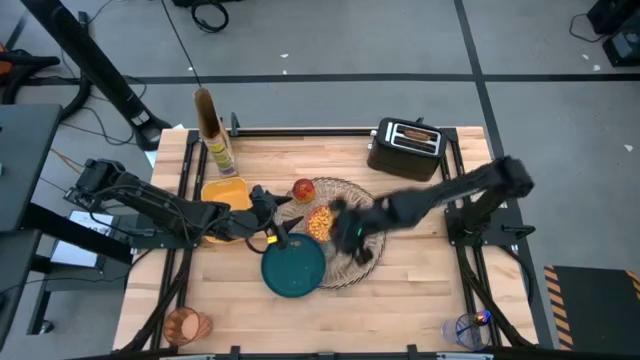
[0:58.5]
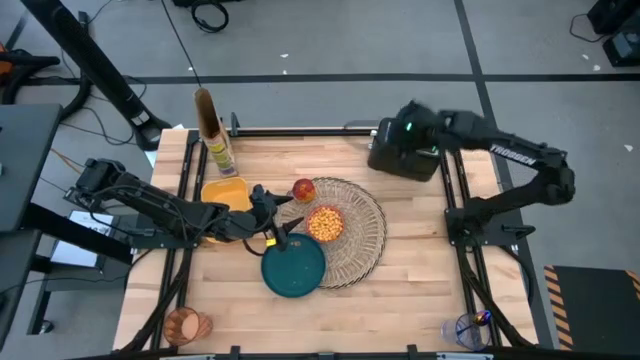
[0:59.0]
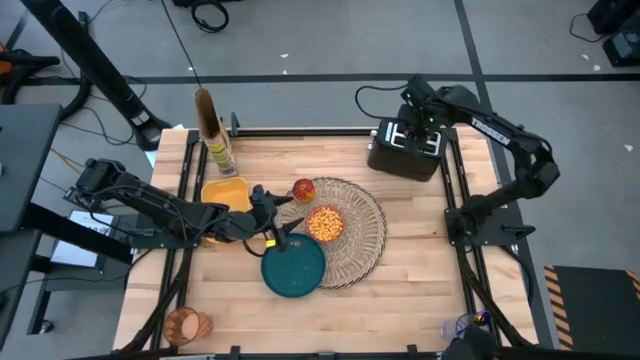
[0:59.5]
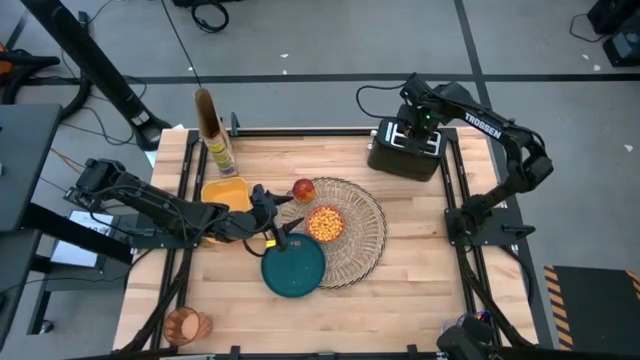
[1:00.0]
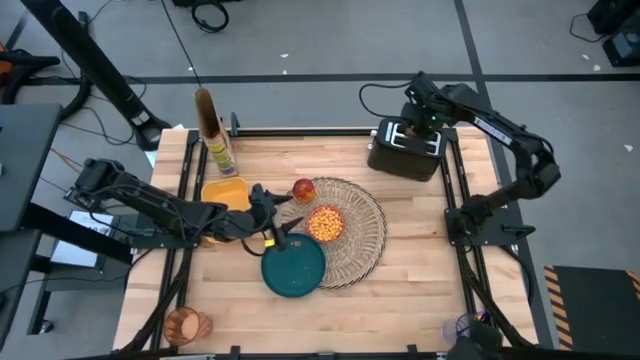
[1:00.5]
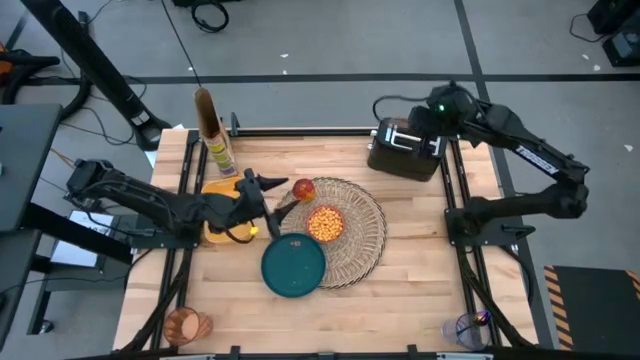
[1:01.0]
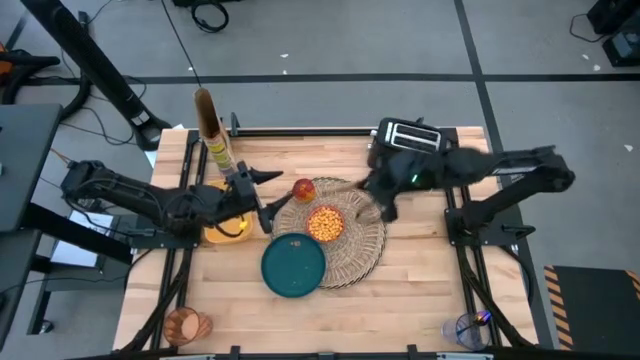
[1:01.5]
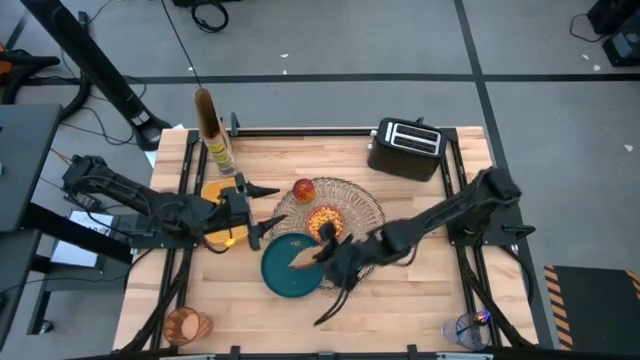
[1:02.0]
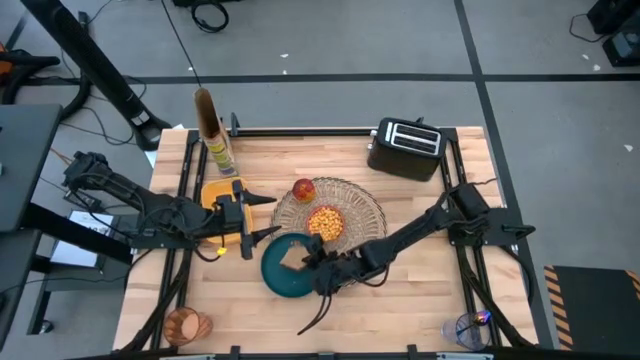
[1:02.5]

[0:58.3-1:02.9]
Task: Arrange a breakfast setting
Put the toast bread on the blue plate from the toaster on the brown table mat

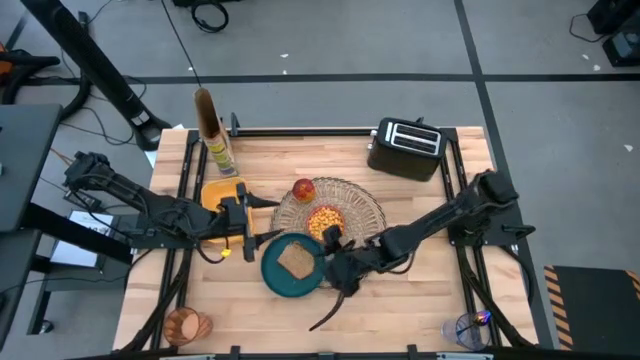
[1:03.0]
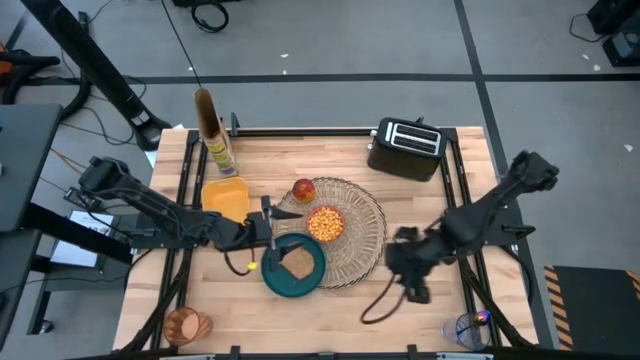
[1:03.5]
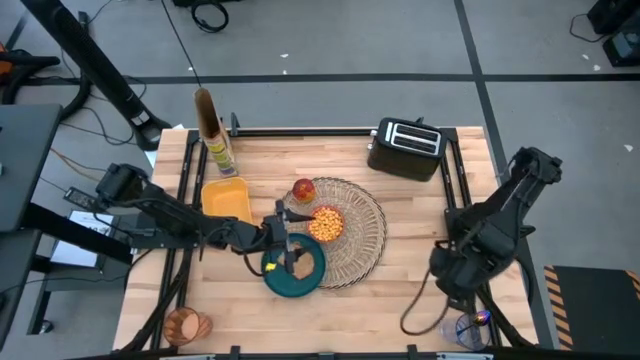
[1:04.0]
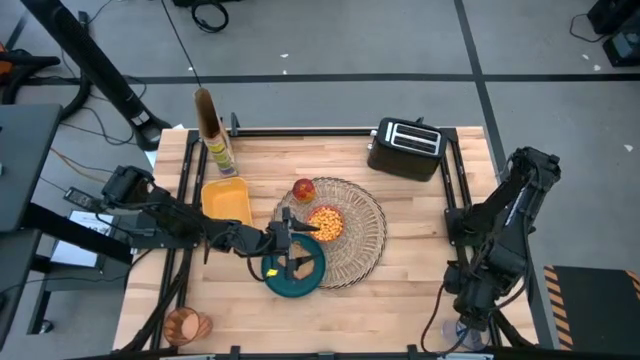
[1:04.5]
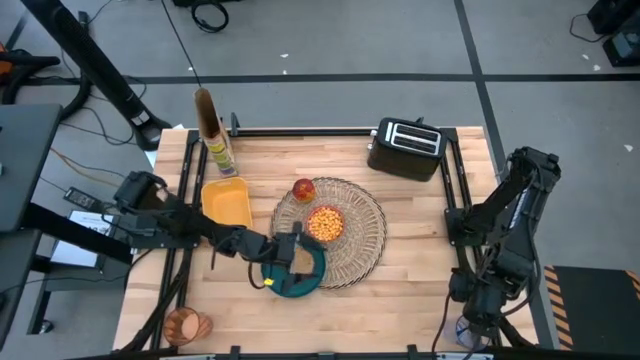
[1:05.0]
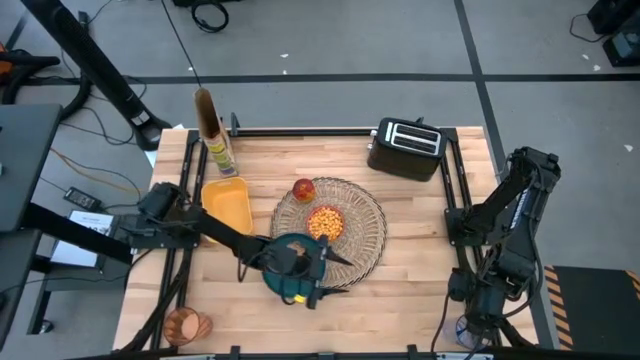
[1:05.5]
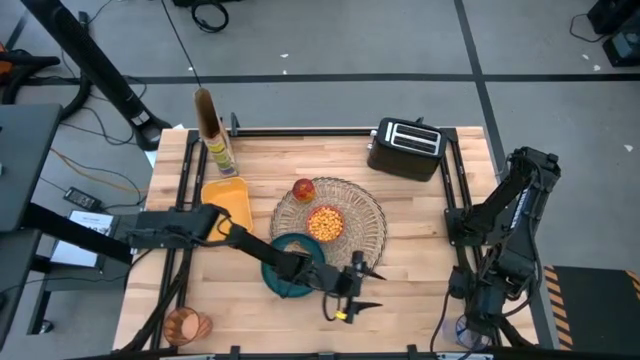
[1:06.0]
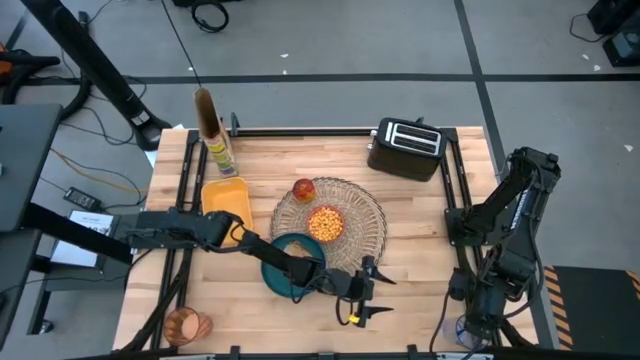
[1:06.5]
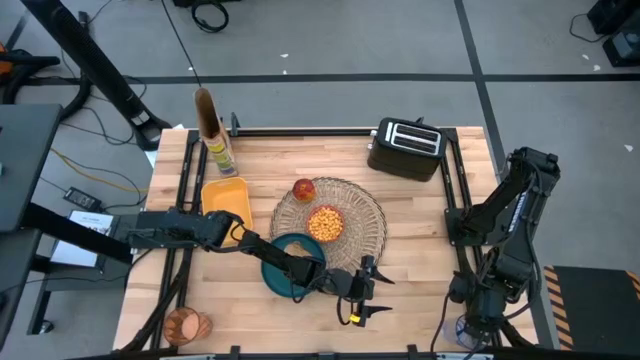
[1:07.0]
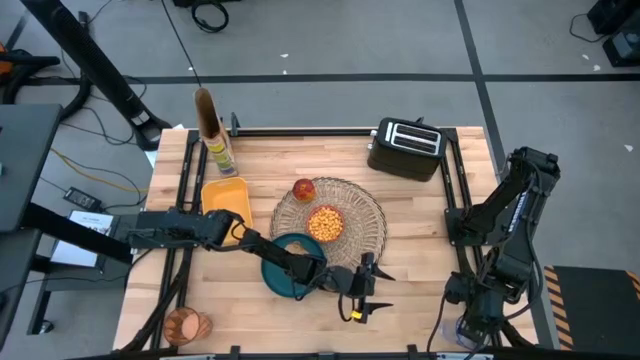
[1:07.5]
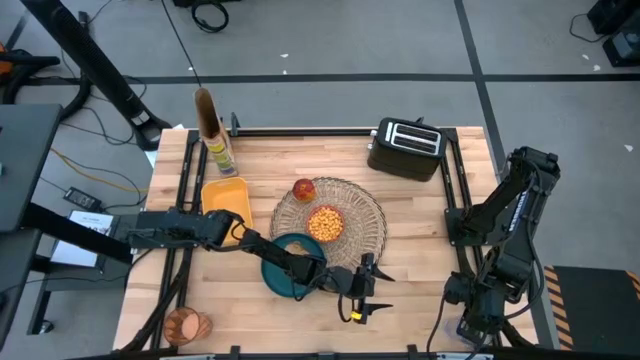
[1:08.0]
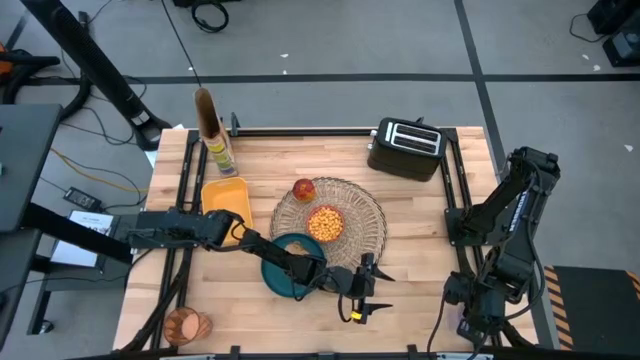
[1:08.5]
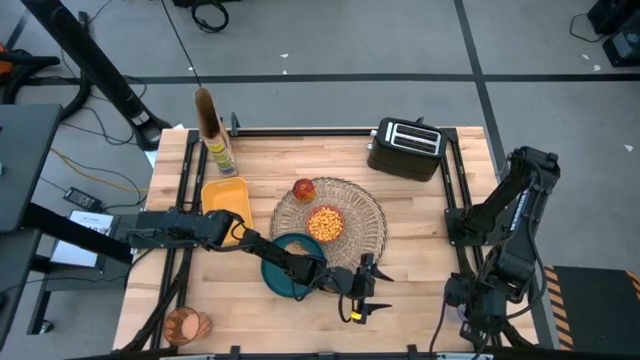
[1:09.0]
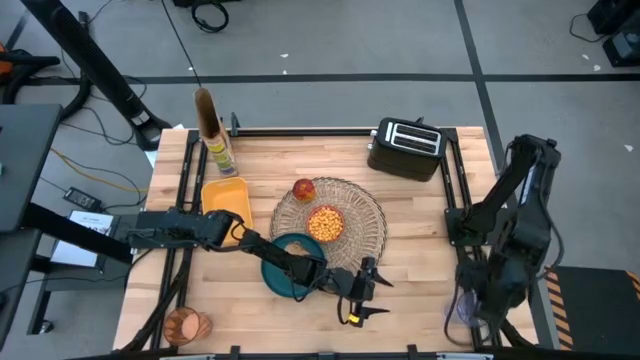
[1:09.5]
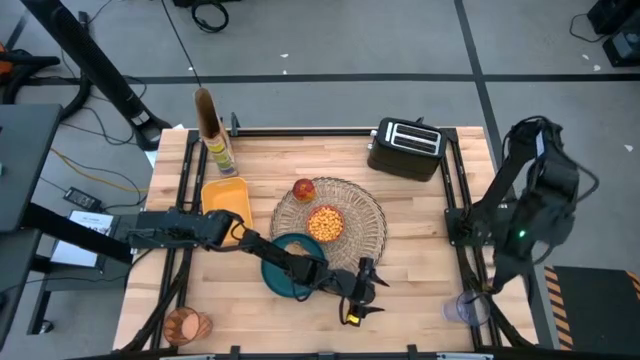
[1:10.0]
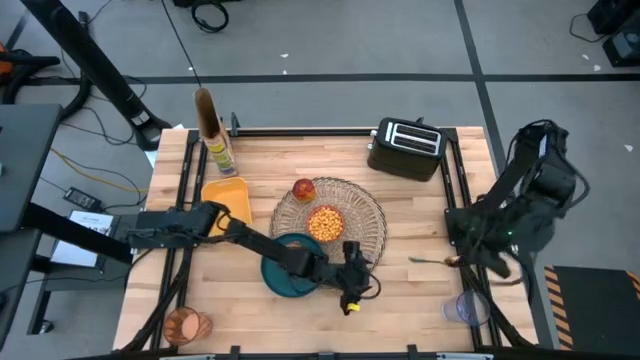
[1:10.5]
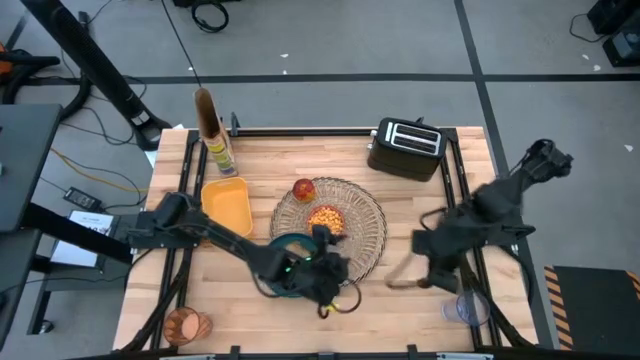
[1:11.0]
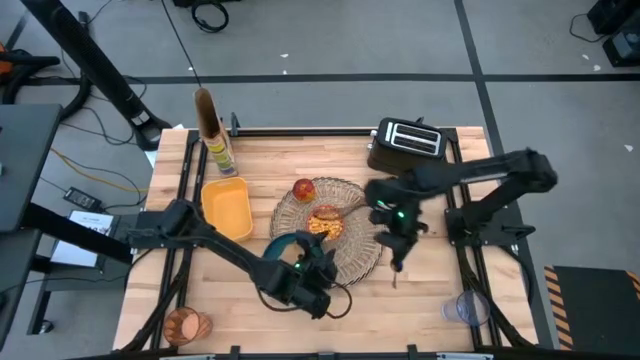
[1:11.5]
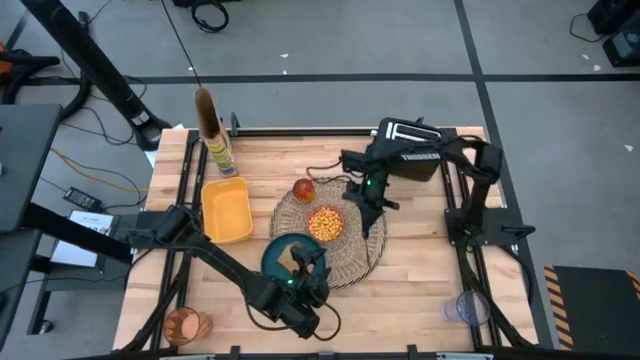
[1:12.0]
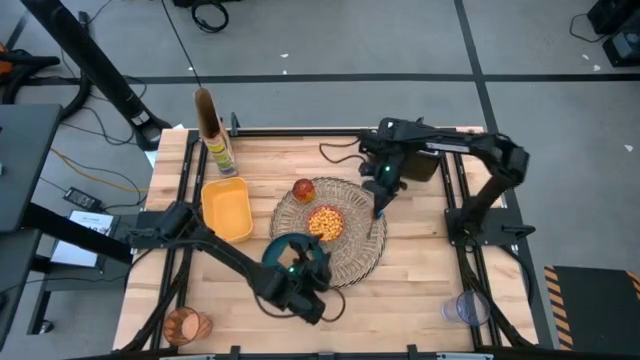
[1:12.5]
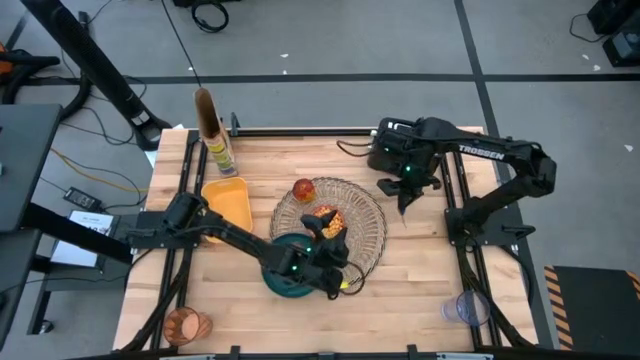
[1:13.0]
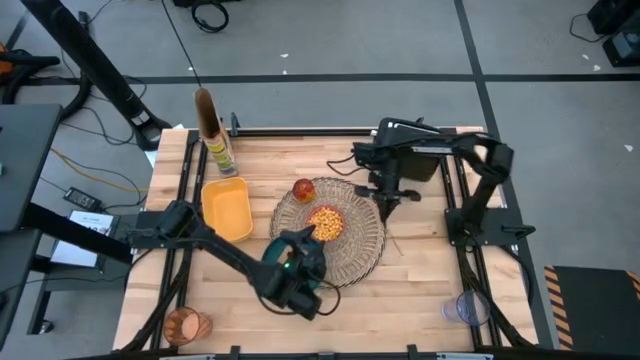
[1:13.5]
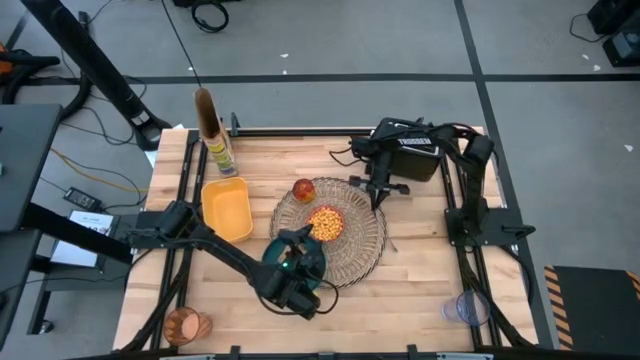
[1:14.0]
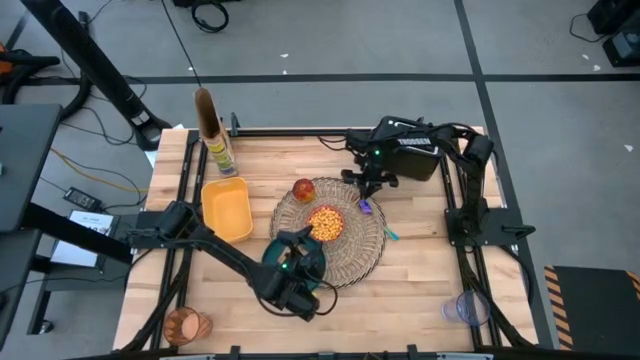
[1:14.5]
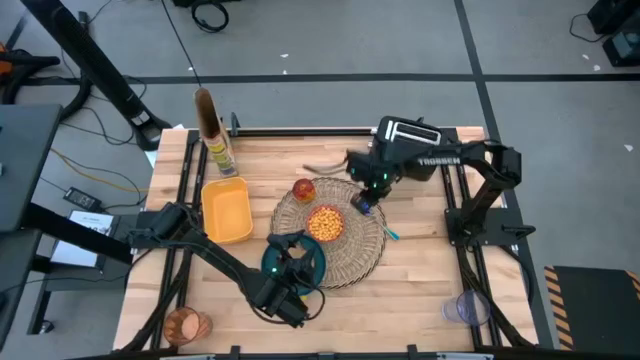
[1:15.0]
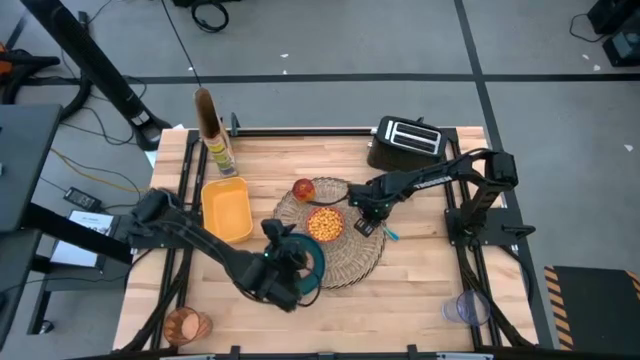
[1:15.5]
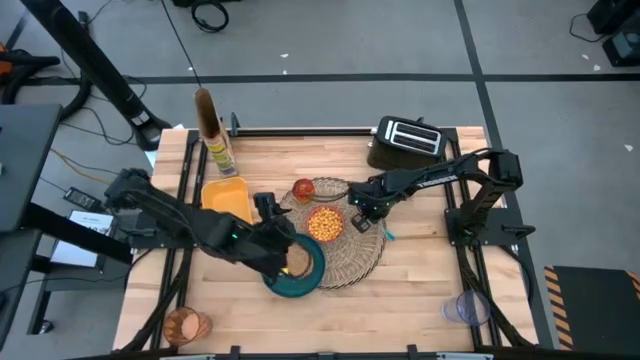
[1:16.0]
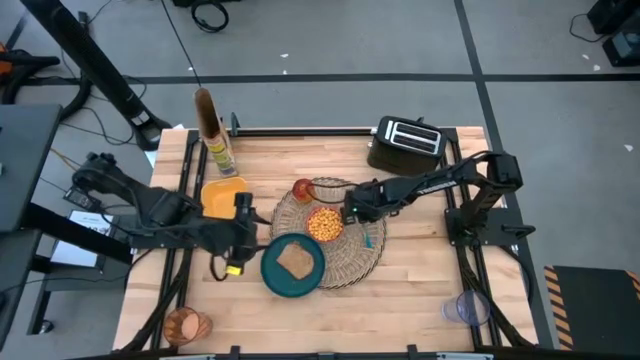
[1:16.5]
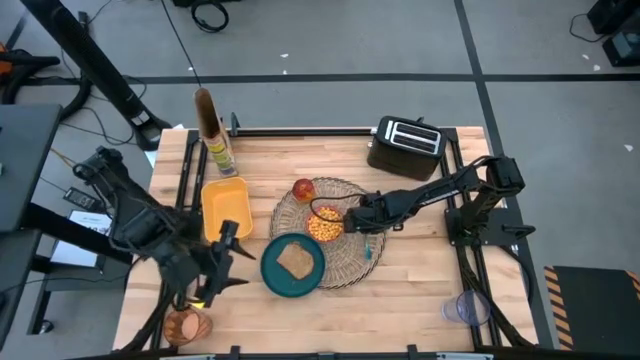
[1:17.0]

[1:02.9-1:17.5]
Put the blue spoon to the right of the red bowl on the brown table mat

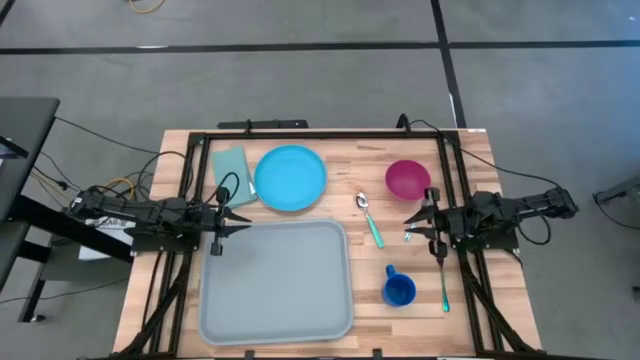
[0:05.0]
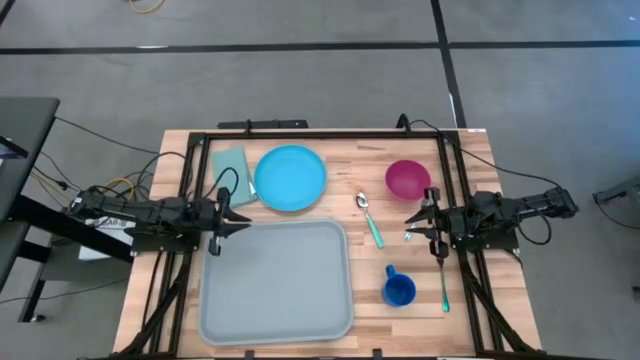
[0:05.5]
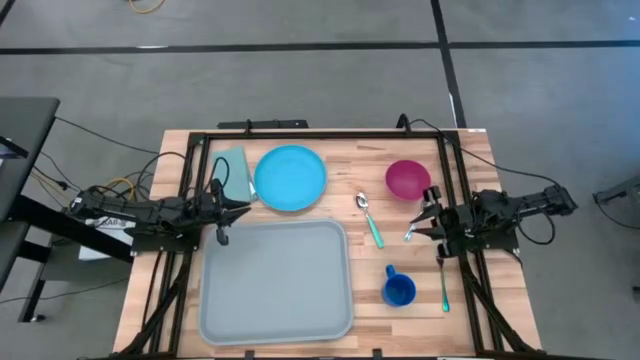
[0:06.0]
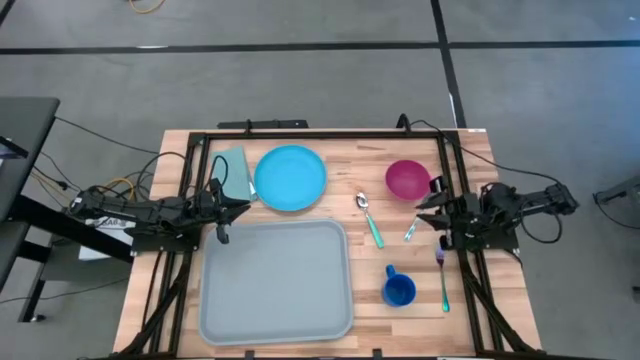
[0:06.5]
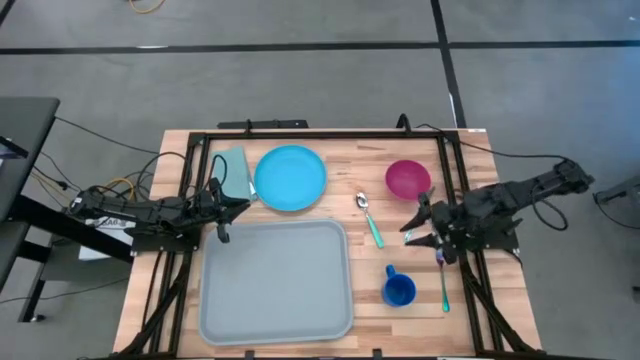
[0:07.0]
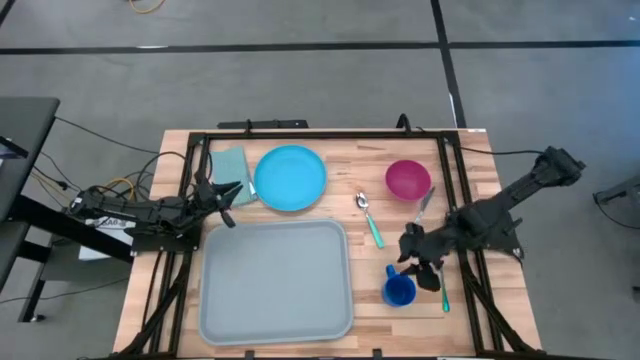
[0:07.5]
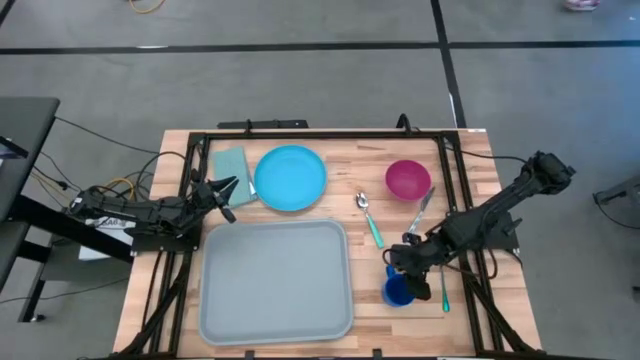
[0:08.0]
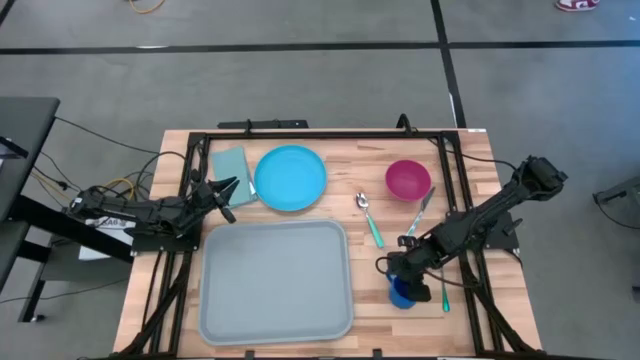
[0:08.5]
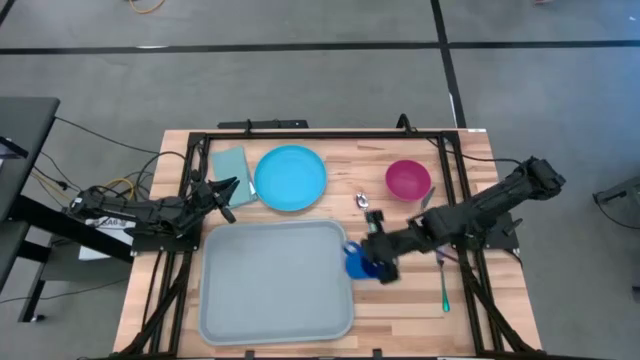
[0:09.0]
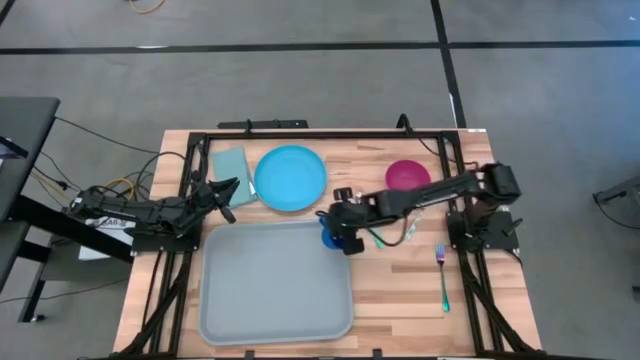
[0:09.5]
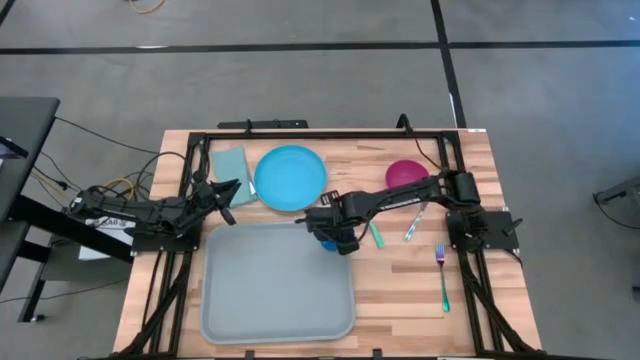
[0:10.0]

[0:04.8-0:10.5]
Task: Set up tray
Put the blue mug on the gray serving tray
